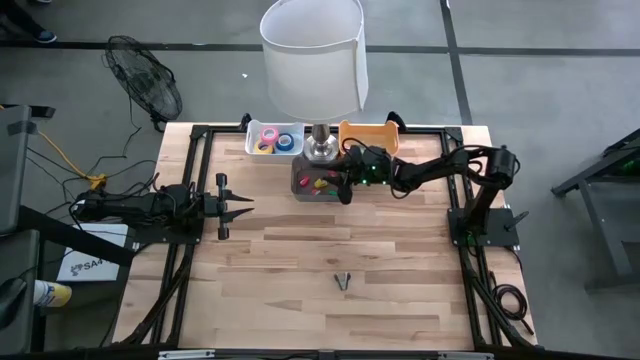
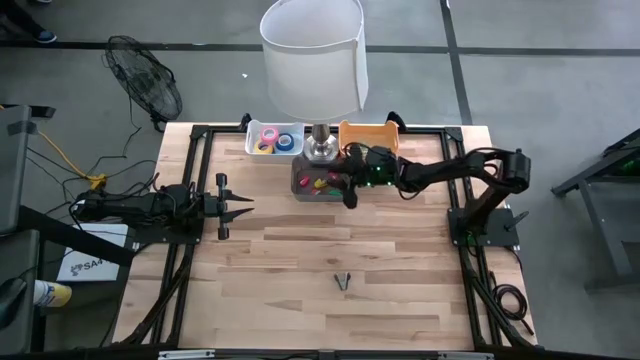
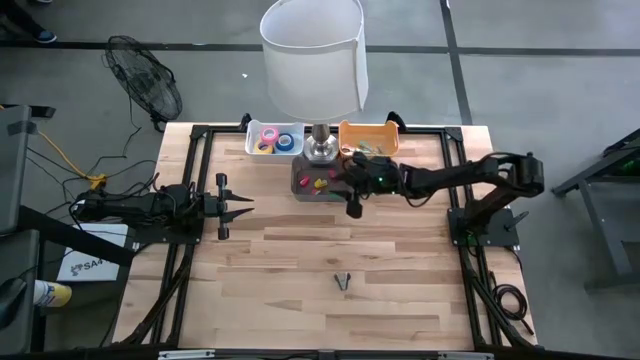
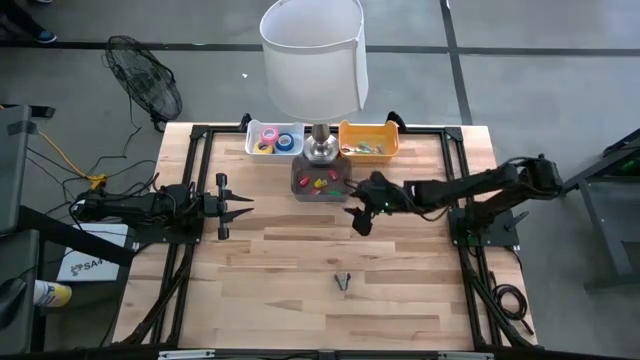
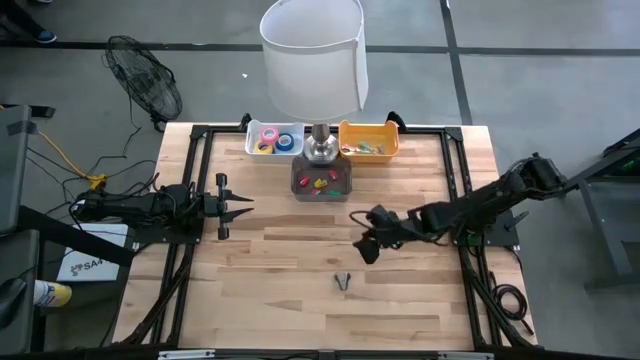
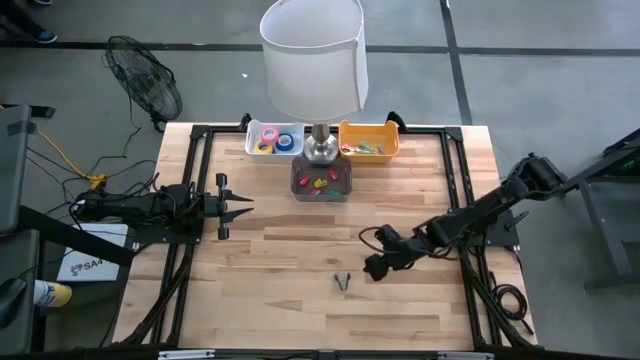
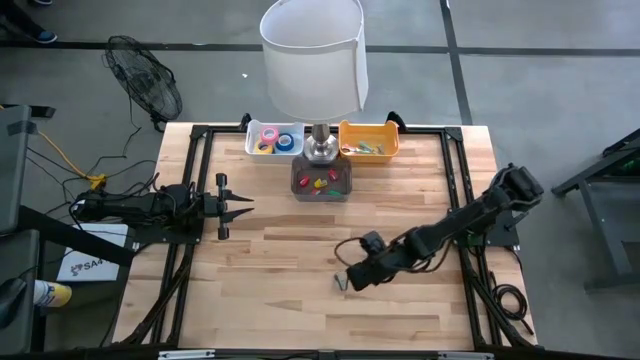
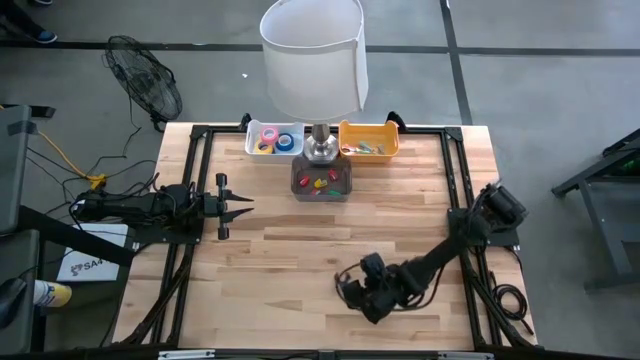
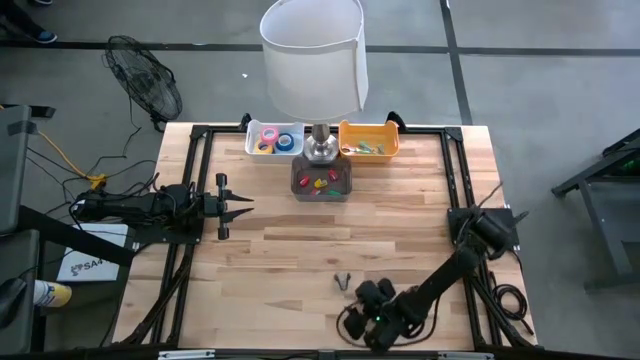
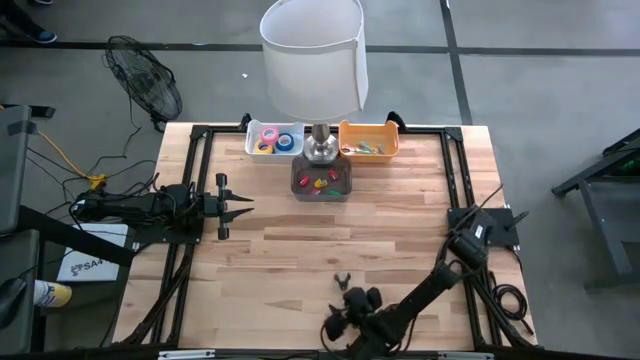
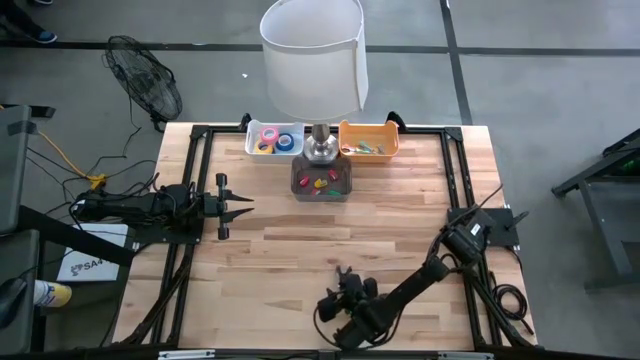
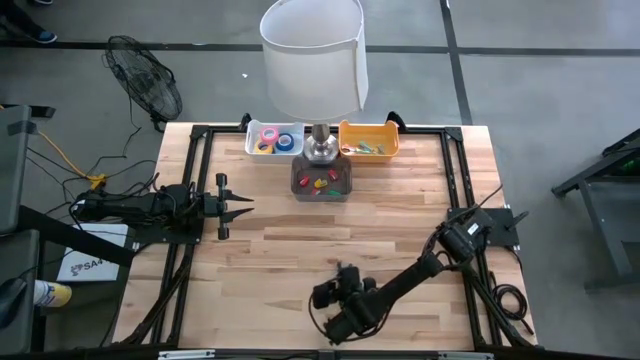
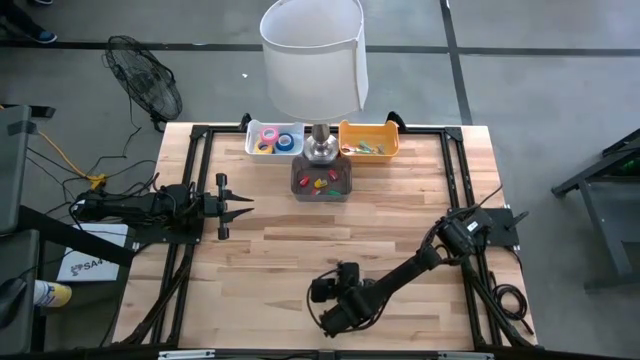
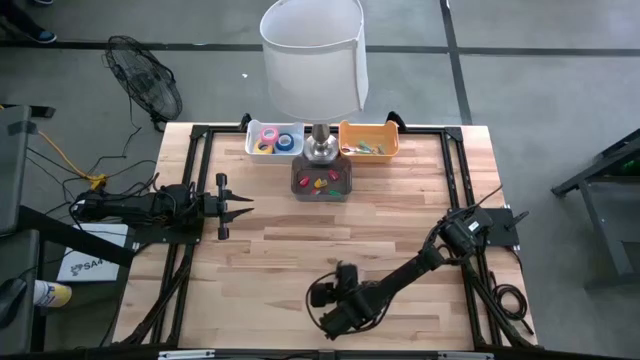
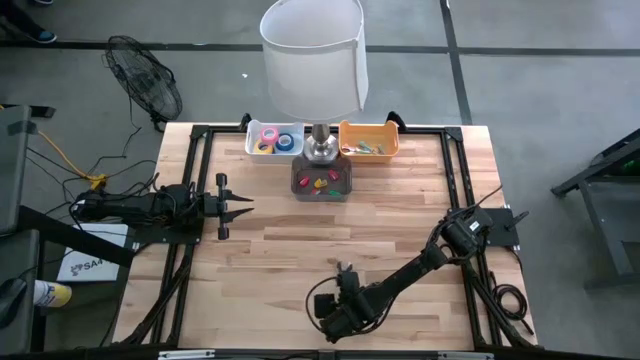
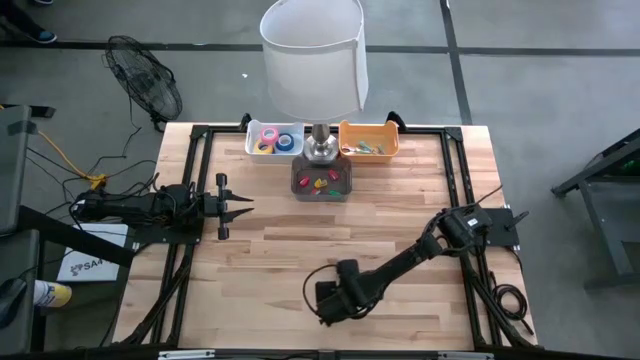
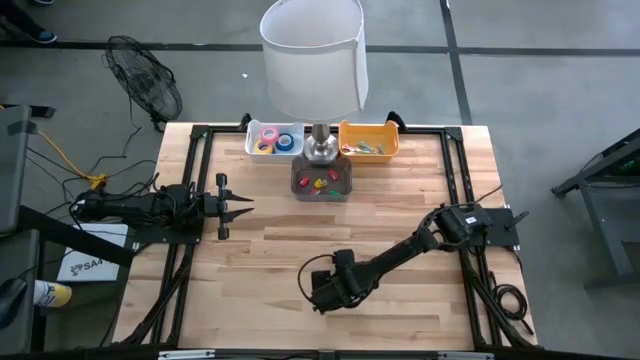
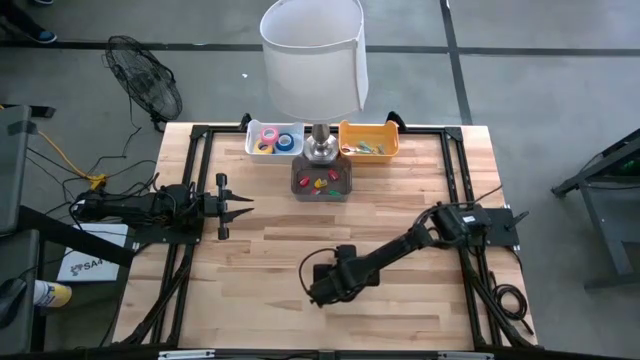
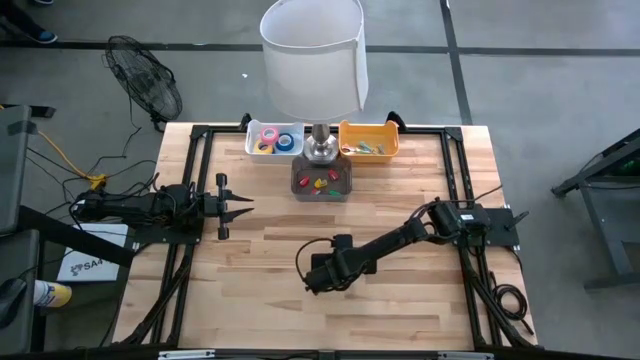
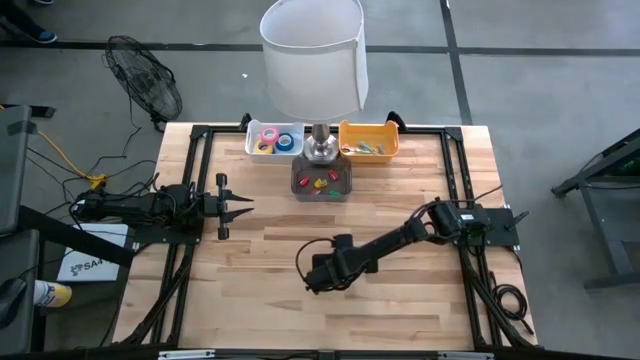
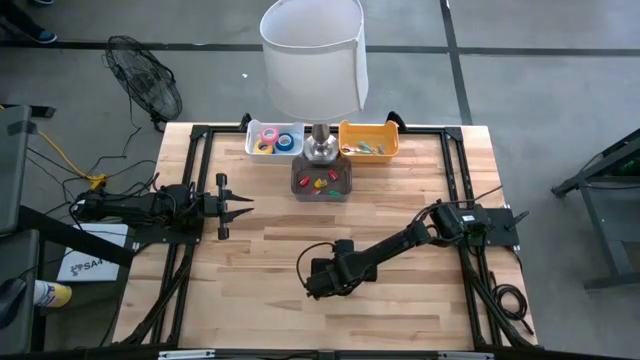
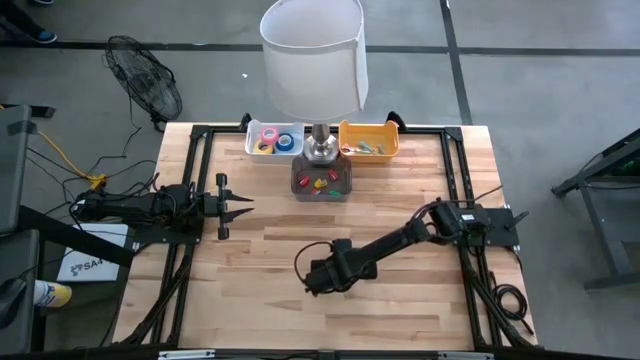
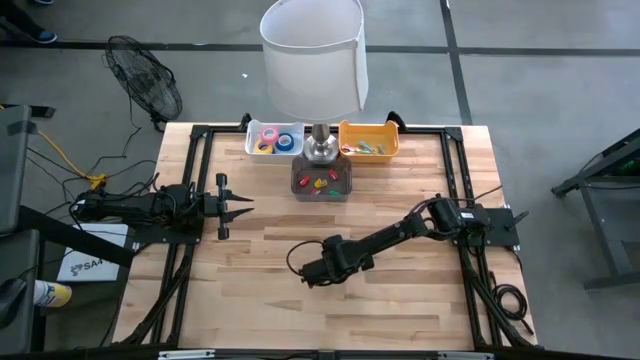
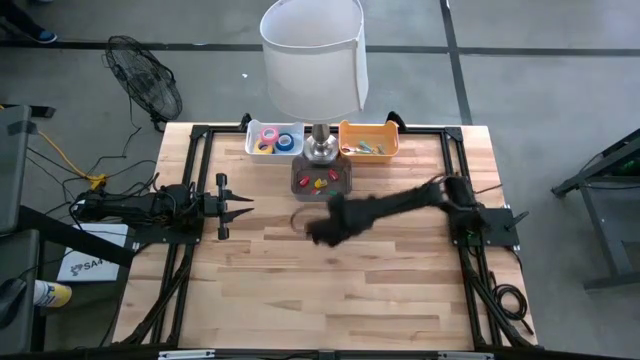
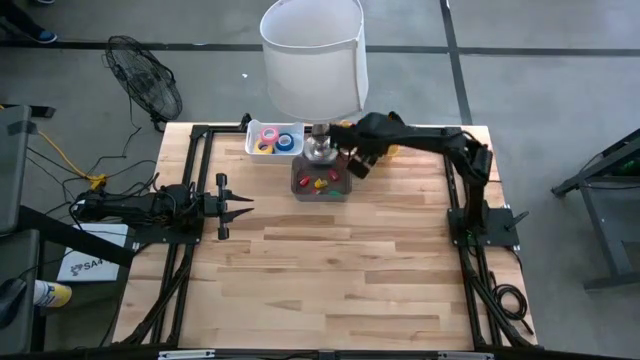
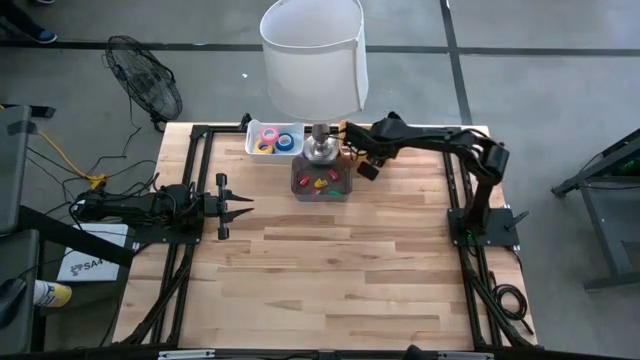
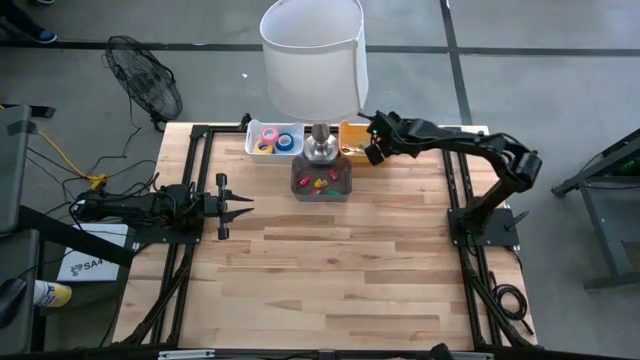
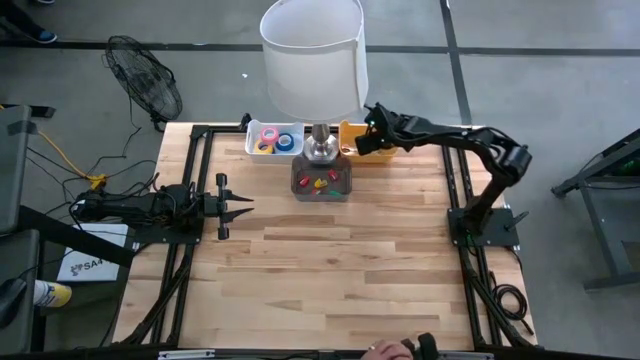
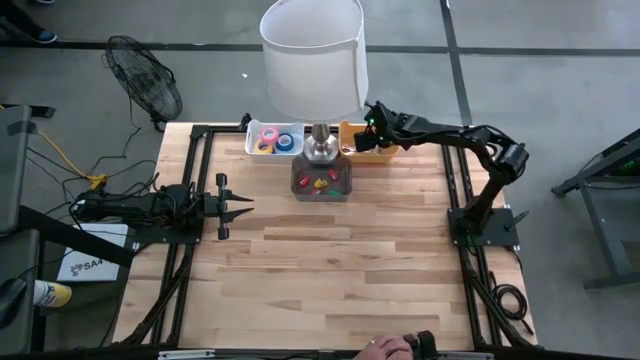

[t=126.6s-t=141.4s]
Task: Pick and place Stapler, Stapler remover, tape
Put the black staple remover into the yellow bin

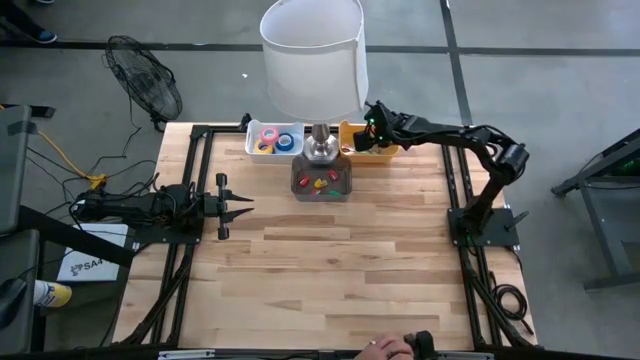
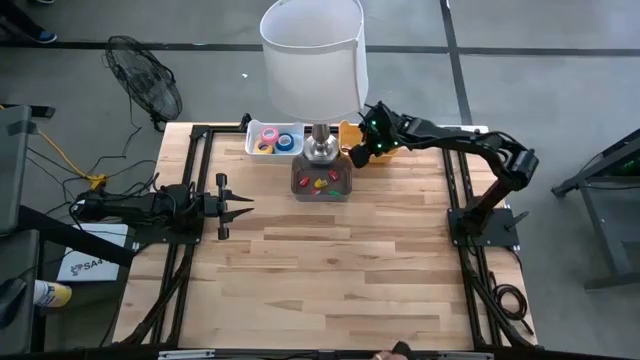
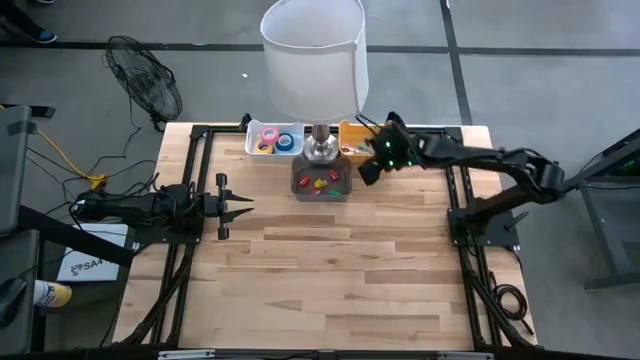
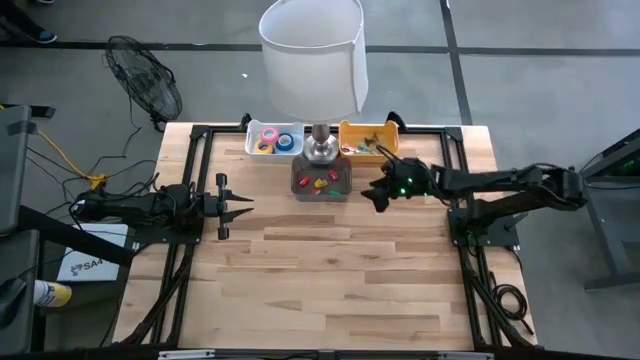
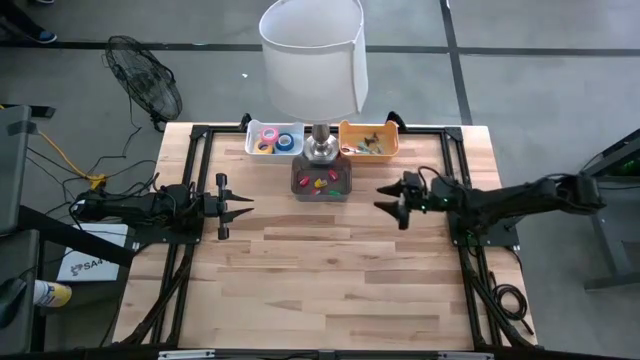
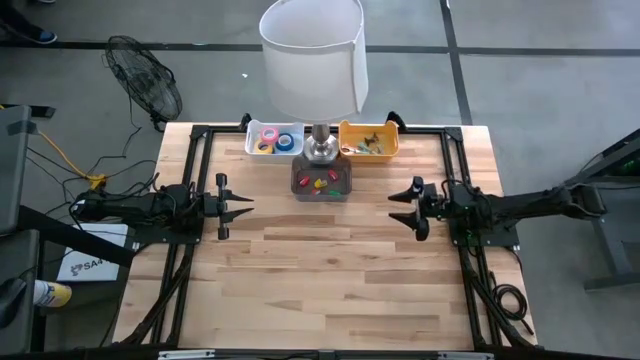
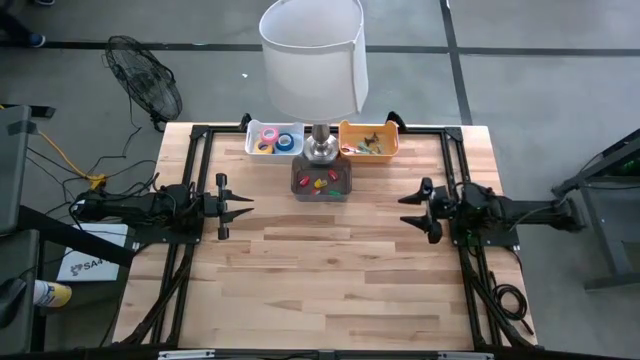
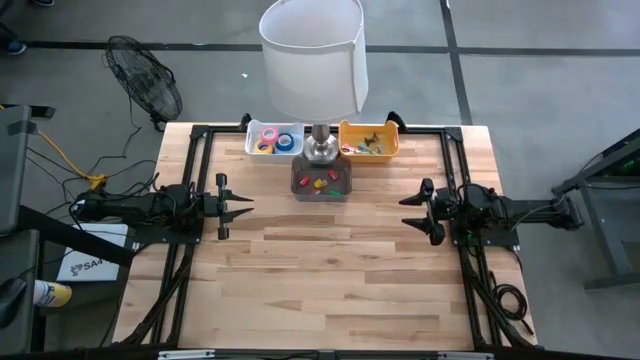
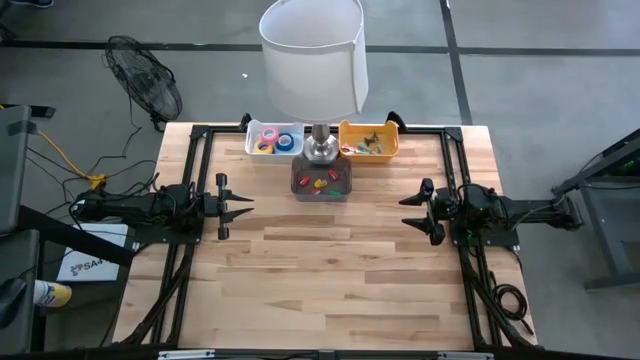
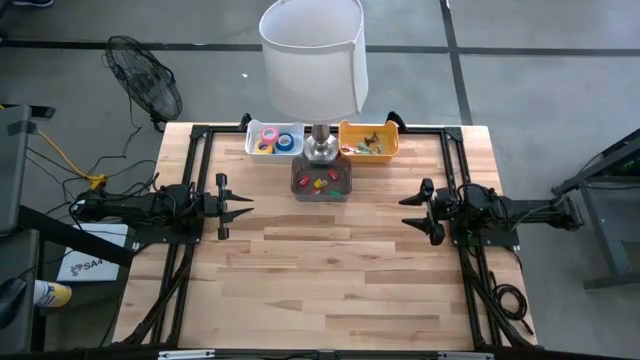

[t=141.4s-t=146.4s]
Return to Home Position

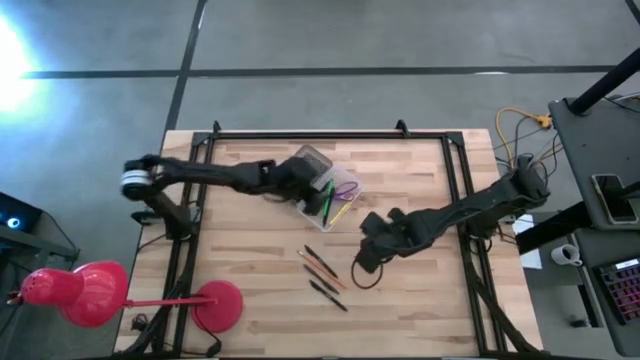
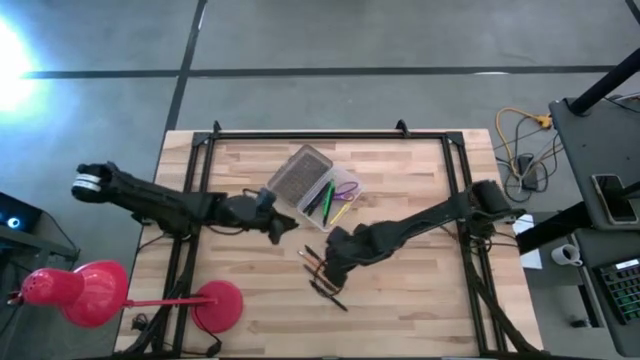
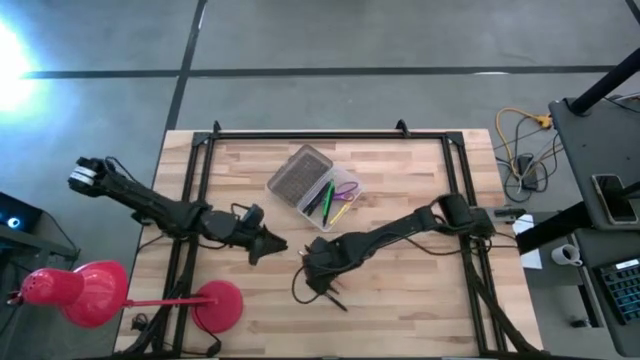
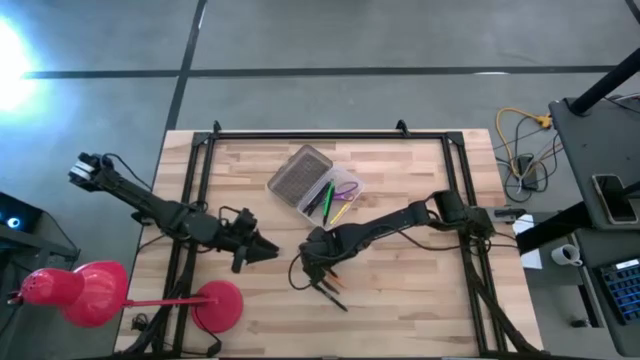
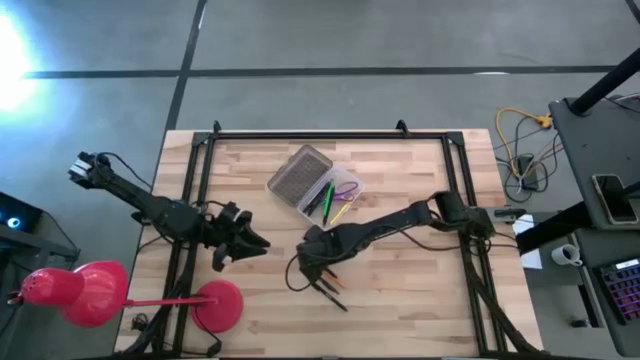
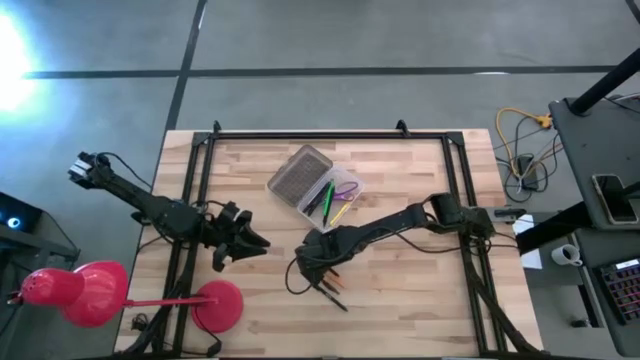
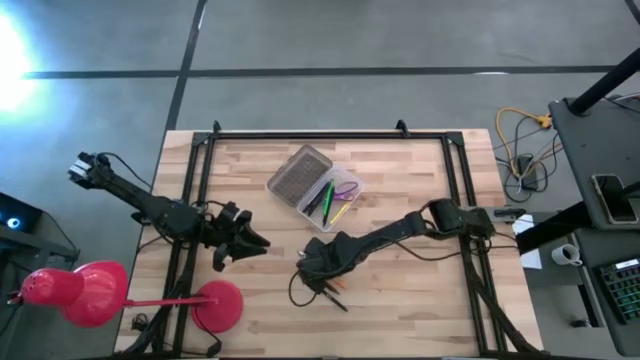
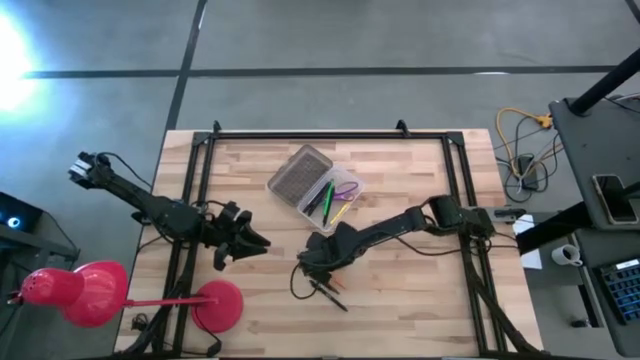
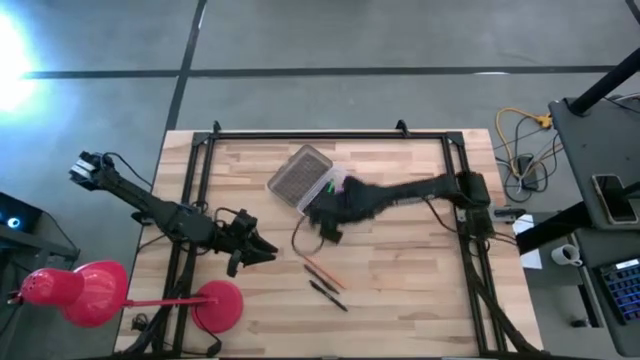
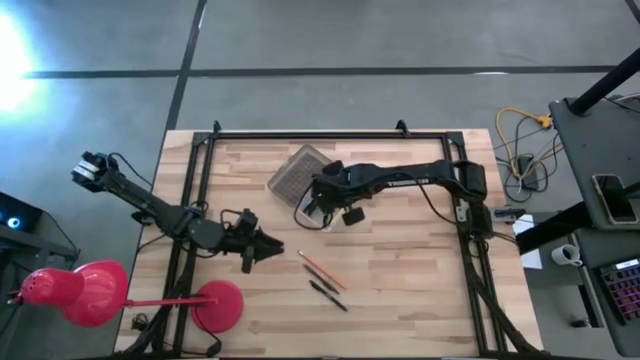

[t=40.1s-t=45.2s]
Task: Pick & place school supplies into a supply box
Put the black pen into the supply box
